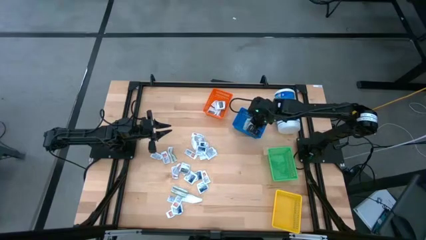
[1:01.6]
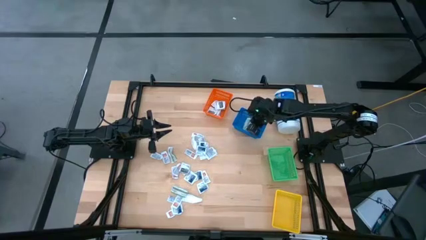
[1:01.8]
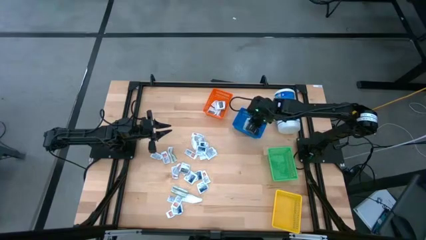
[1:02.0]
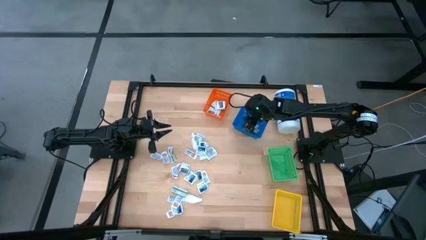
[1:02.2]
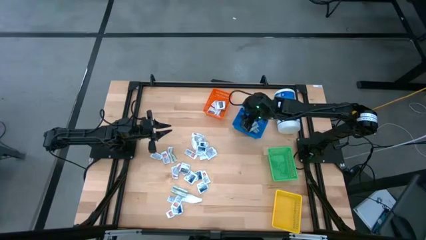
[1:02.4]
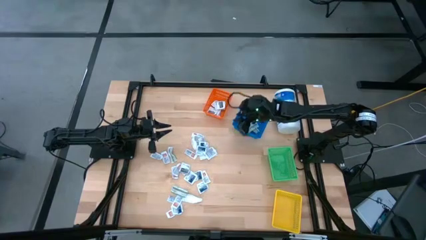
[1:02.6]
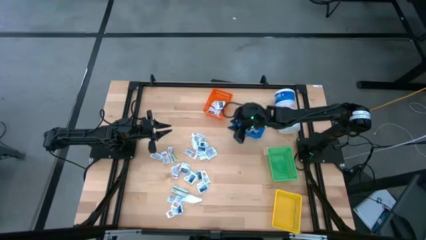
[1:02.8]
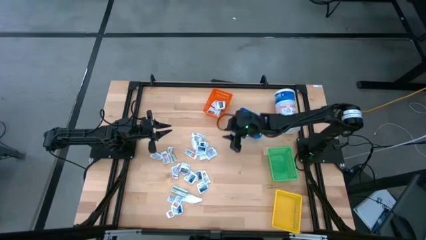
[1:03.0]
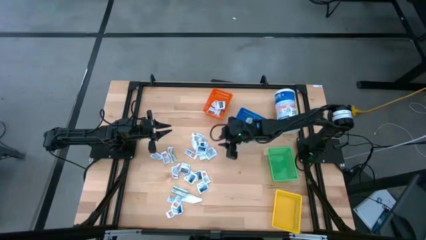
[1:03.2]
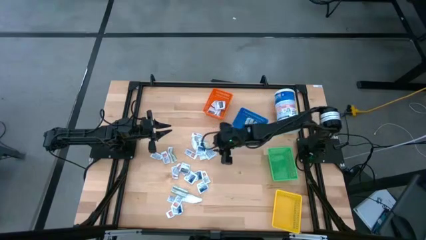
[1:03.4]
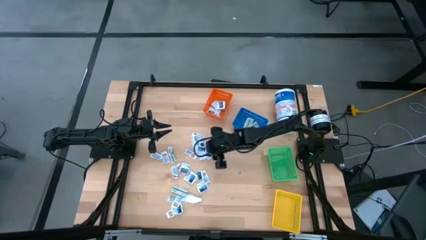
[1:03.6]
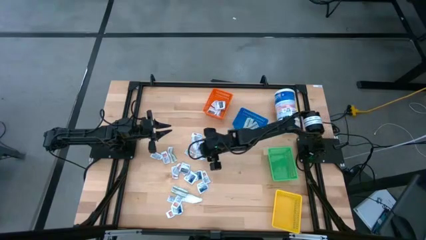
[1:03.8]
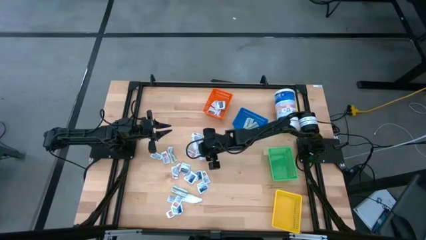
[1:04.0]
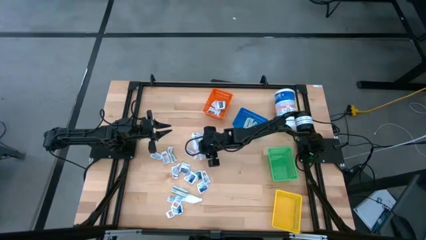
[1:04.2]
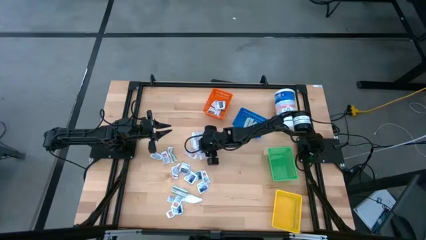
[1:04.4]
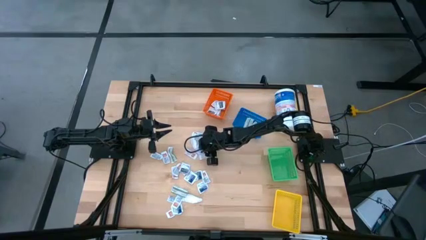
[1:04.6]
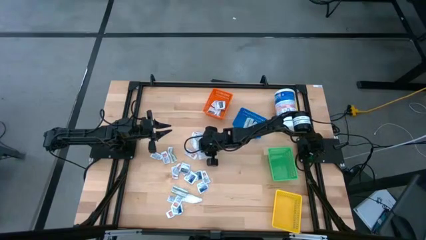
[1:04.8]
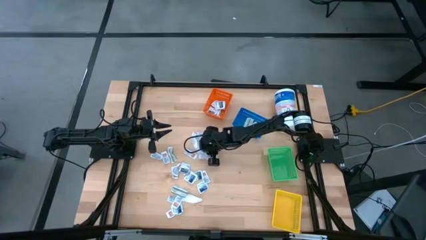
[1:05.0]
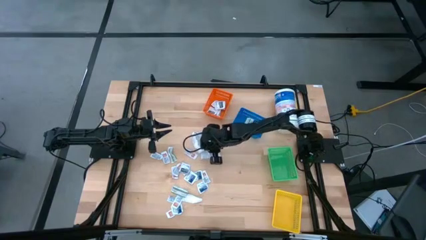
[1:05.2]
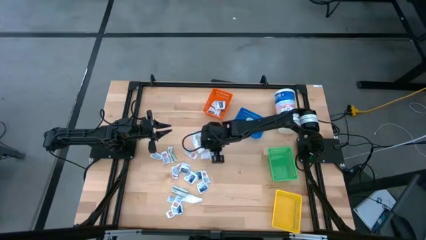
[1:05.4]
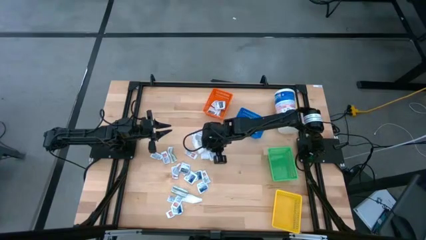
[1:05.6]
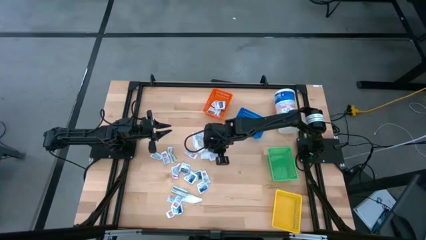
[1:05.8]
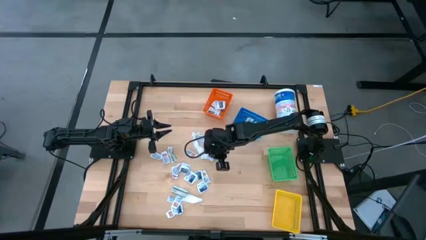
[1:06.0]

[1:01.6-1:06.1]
Task: Pick & Place First Aid Supplies
Put the blue alcohol pad into the green basket

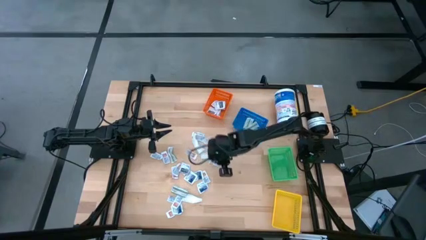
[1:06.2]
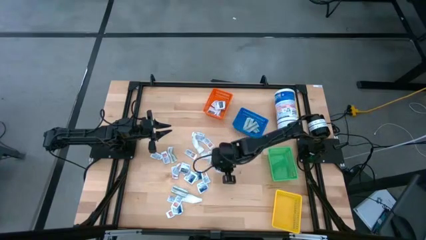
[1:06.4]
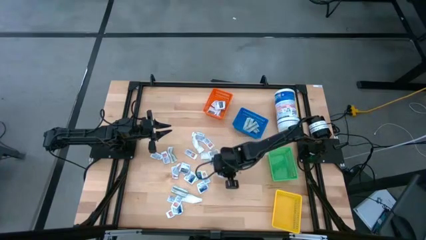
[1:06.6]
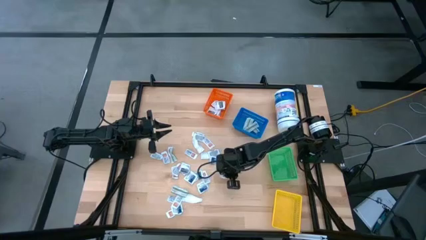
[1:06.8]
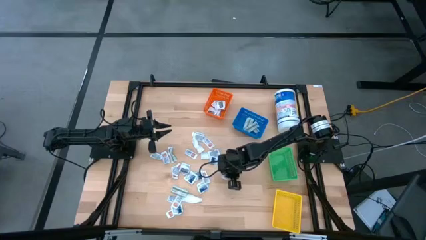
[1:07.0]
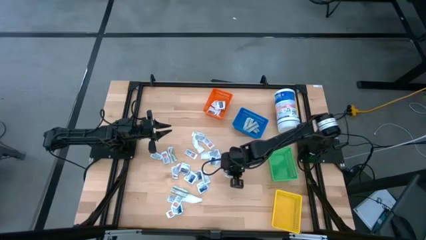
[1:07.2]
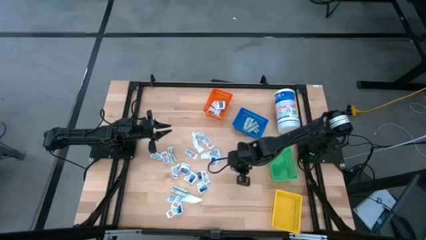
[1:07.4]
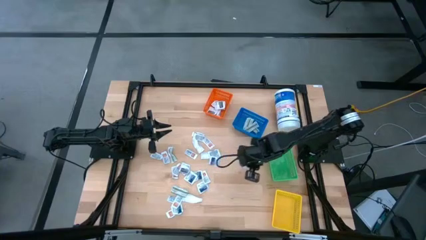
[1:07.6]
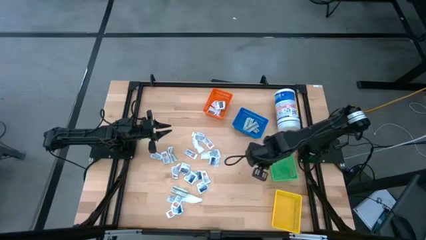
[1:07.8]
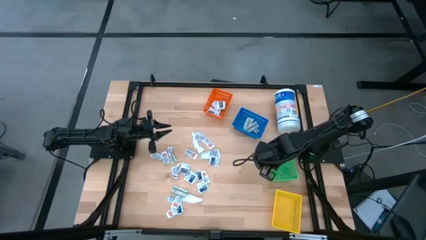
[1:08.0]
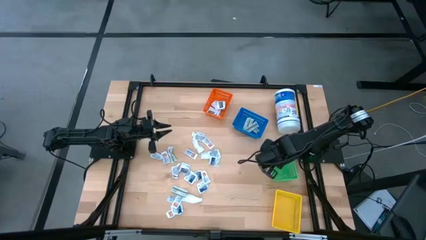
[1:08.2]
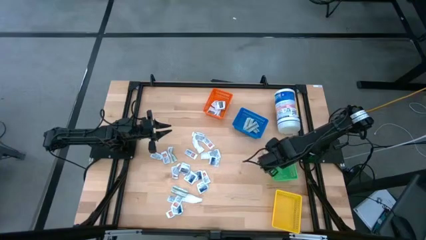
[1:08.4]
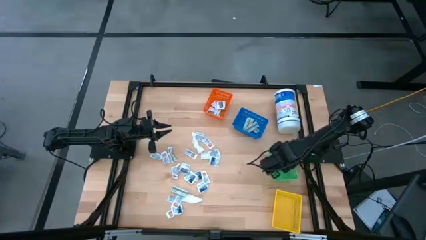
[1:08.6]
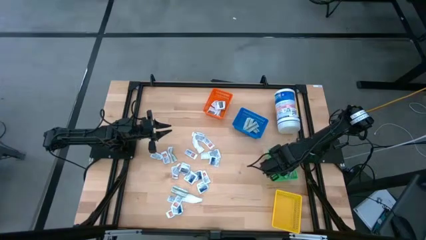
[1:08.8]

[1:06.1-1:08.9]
Put the blue alcohol pad into the green basket

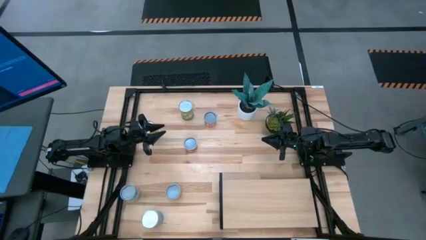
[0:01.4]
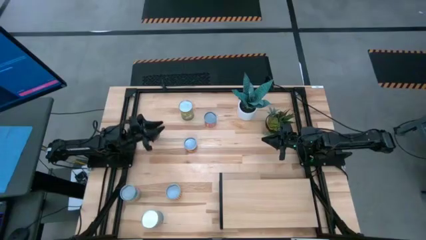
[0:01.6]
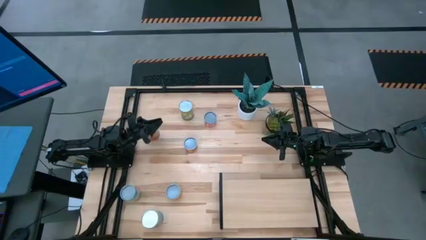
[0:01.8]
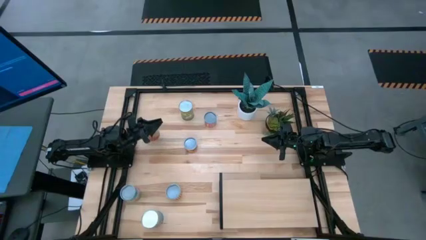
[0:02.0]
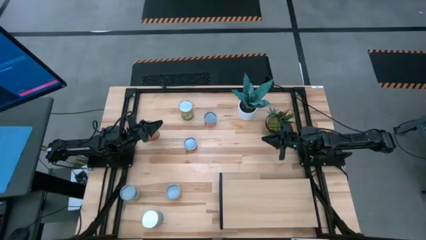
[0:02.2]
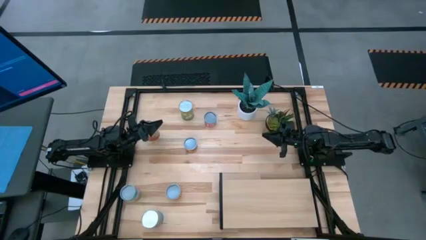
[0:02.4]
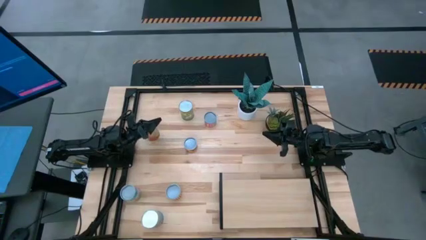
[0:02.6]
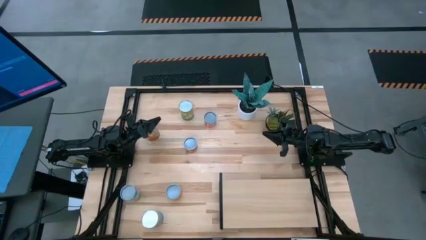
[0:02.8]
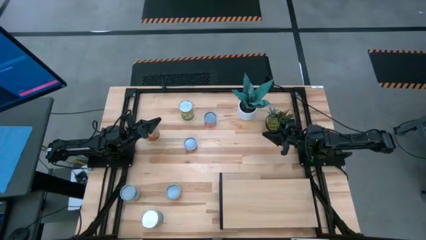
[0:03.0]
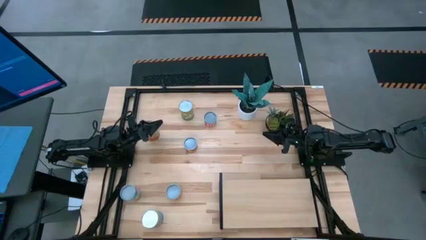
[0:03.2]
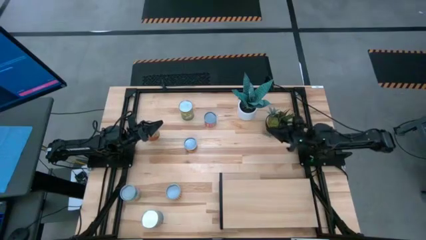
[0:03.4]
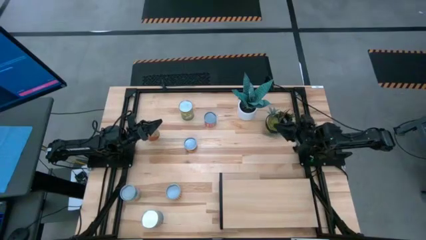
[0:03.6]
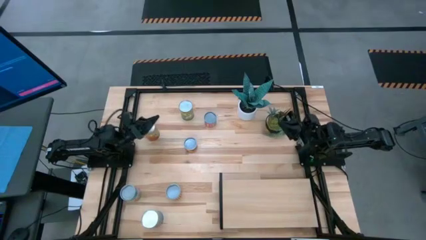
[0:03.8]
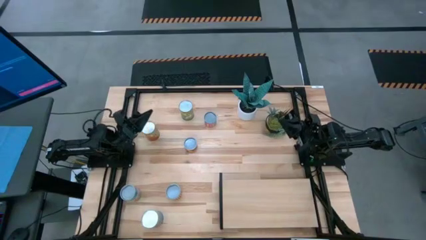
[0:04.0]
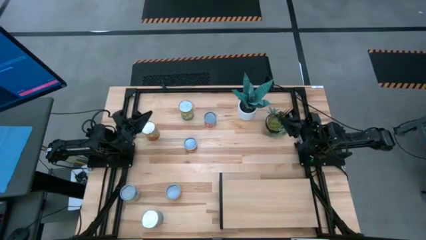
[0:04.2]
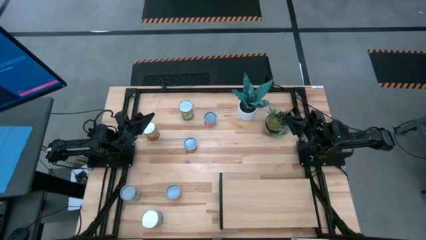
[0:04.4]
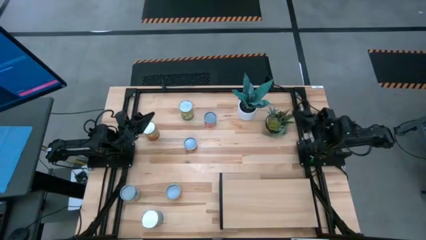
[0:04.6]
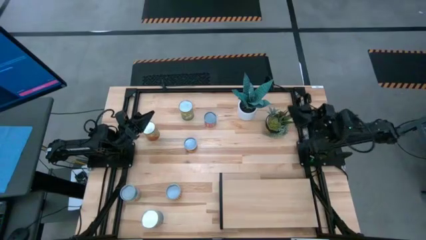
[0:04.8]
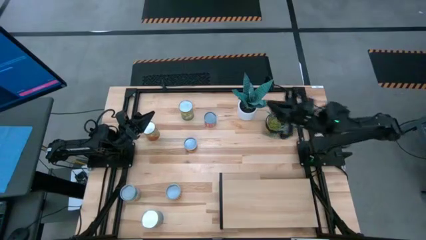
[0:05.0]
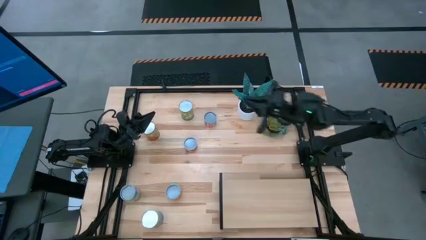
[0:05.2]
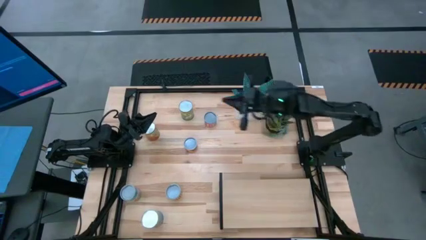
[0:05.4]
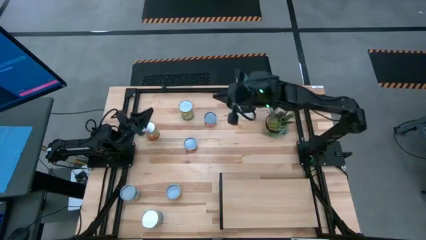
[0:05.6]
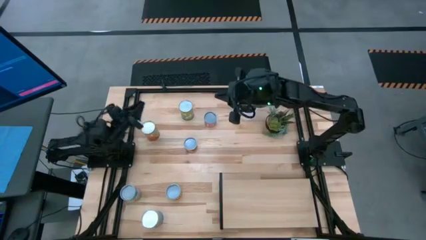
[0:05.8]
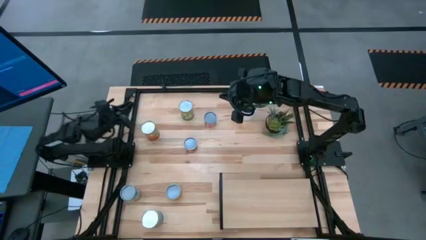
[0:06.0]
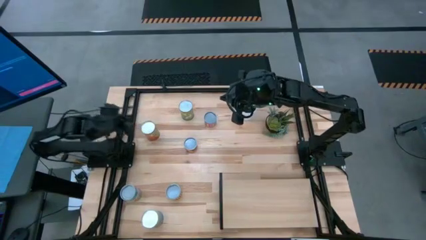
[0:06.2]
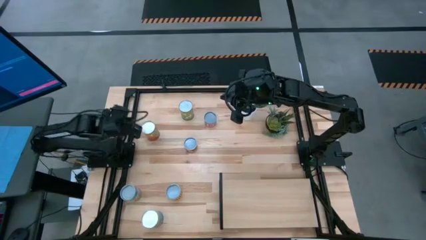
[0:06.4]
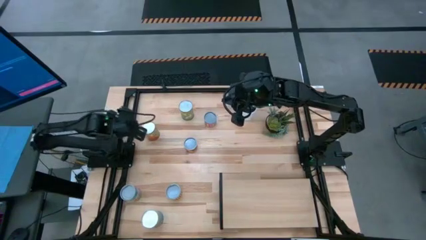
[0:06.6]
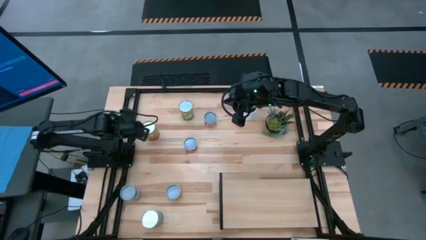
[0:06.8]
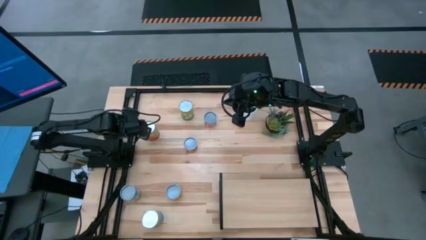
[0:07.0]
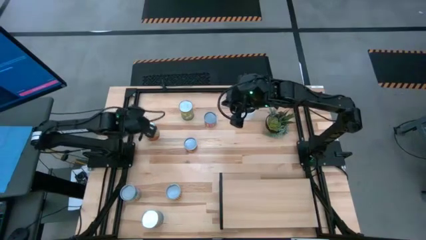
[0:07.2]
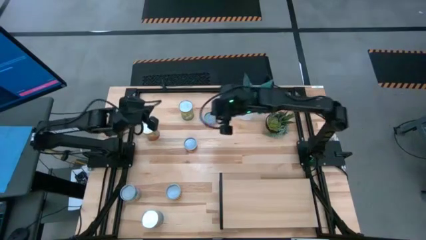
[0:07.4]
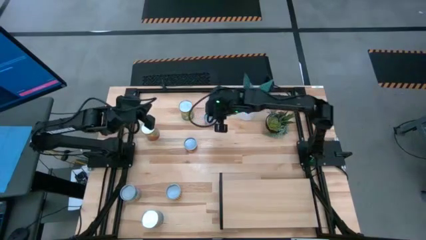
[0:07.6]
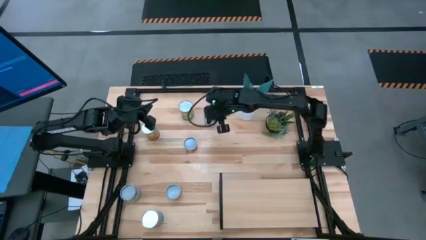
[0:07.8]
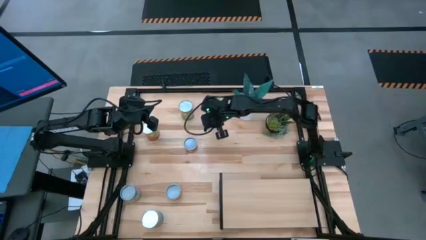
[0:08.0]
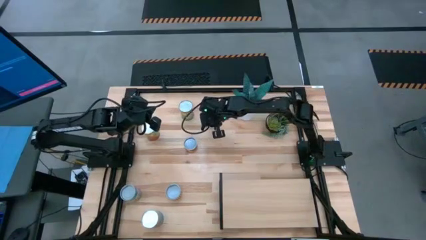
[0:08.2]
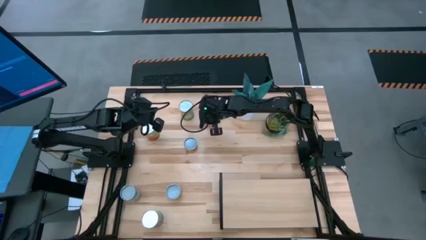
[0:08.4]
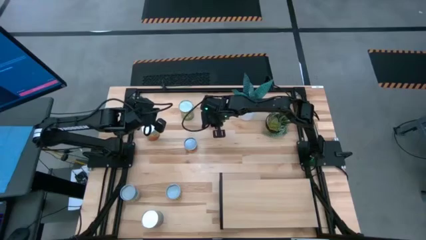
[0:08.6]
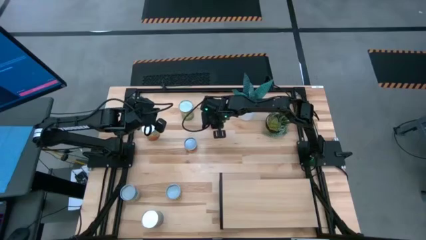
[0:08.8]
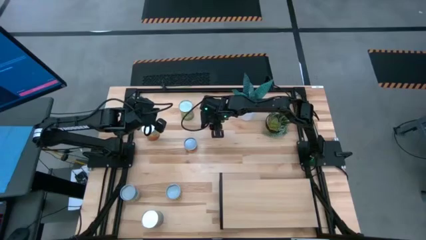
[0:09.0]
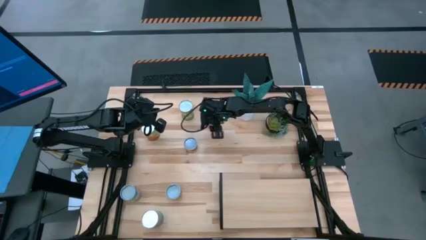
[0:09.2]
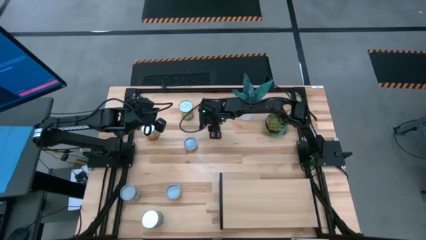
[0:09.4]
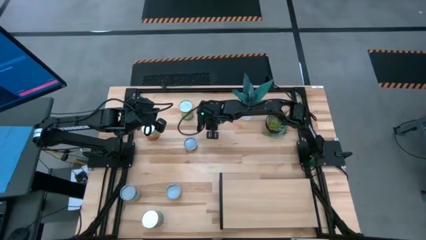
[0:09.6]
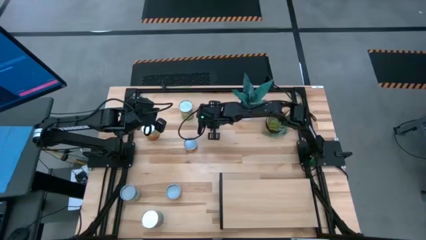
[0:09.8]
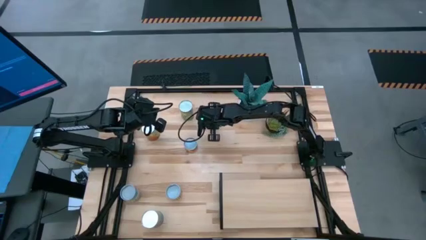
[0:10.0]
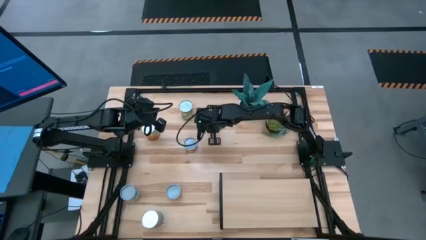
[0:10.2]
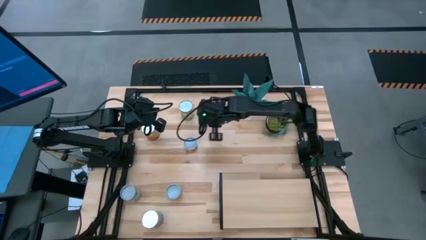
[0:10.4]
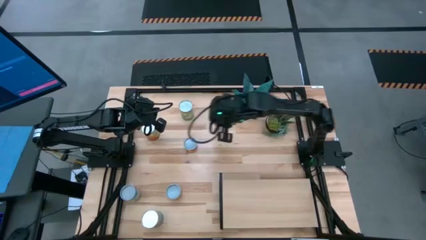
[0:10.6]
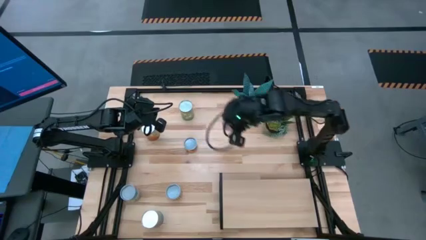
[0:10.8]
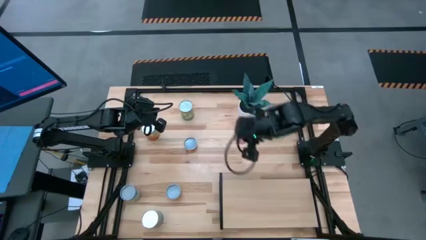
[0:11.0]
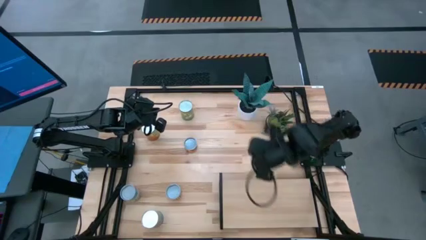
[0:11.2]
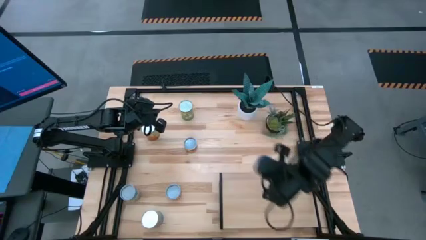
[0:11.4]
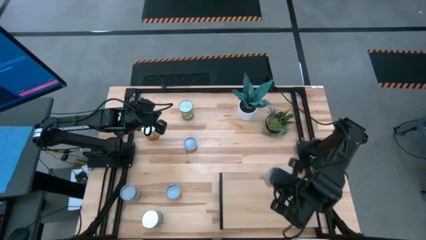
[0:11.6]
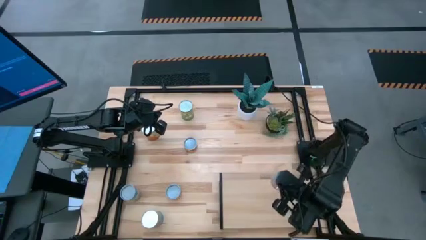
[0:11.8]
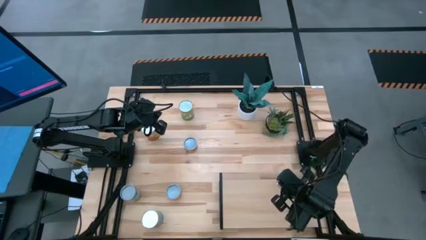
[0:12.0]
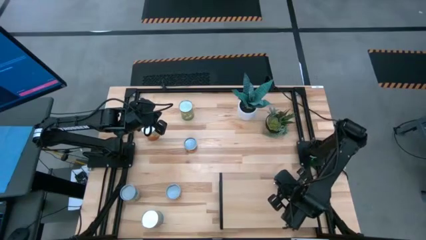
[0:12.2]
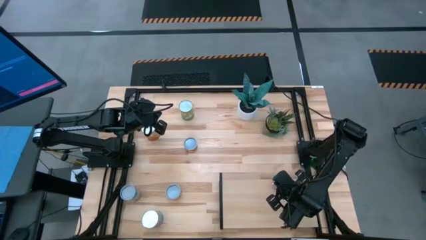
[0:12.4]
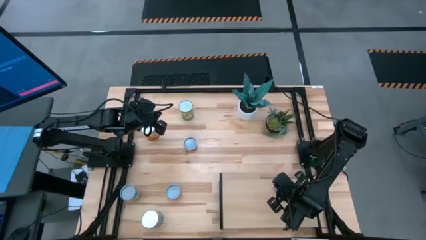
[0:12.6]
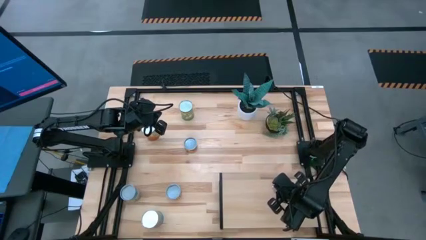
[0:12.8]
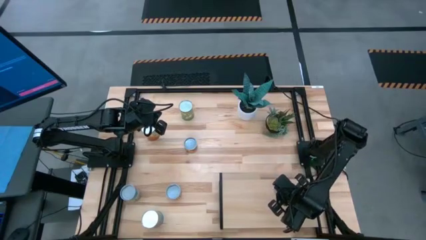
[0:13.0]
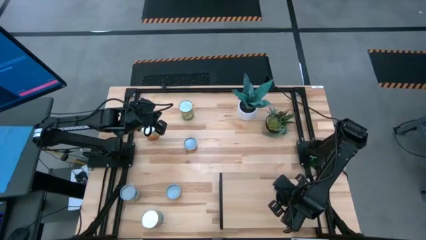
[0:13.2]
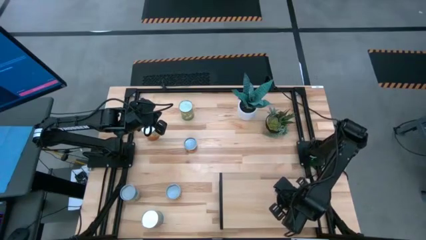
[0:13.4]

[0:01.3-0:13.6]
Task: Pick and place cans onto a shelf
Put the canned corn on the shelf
